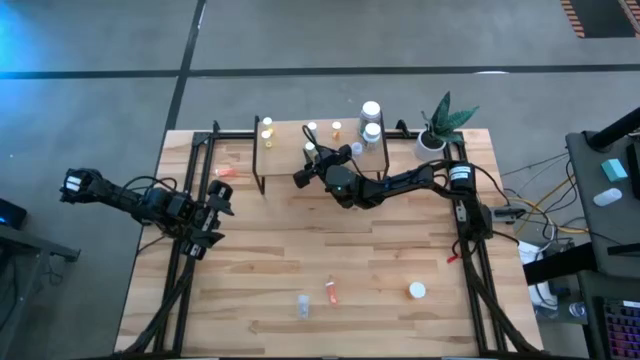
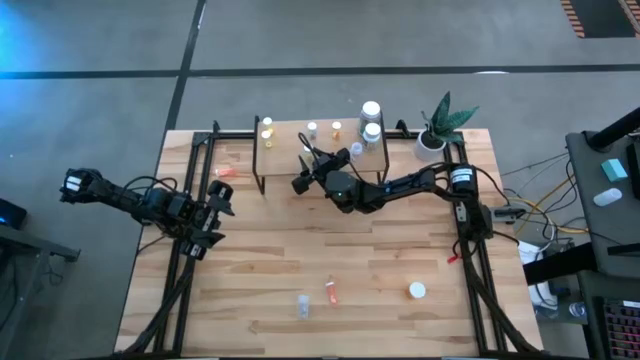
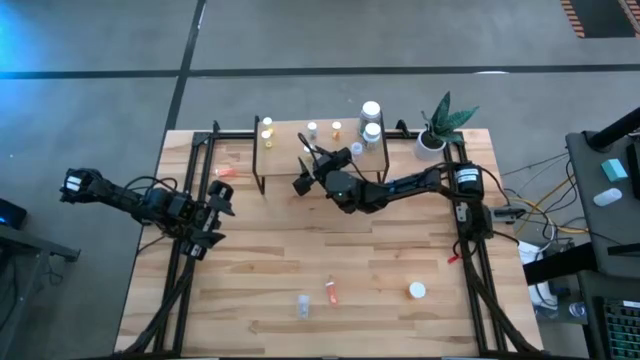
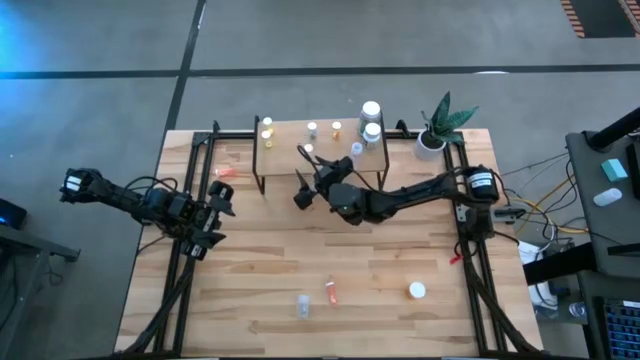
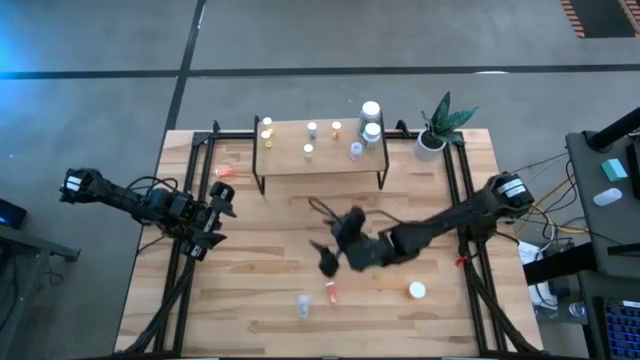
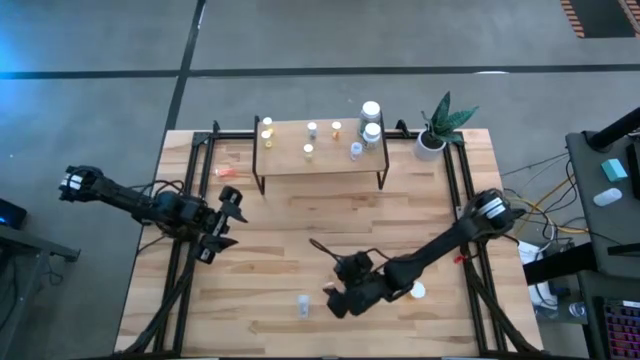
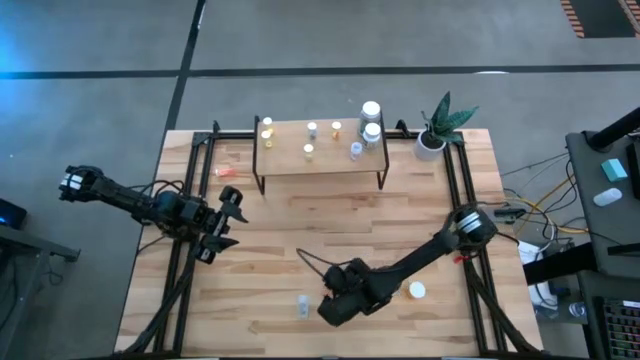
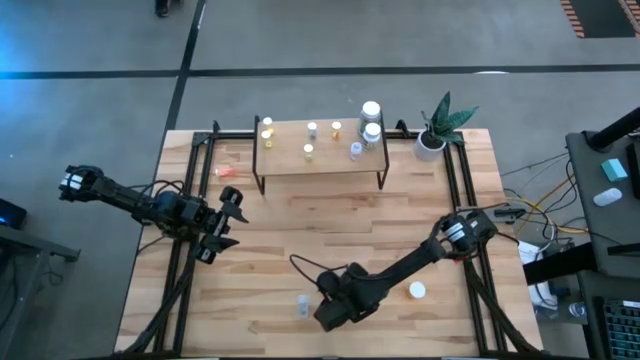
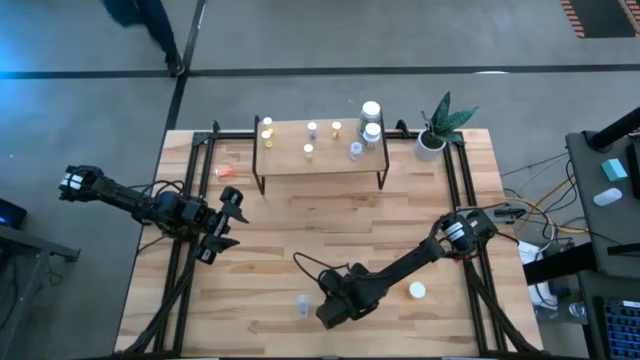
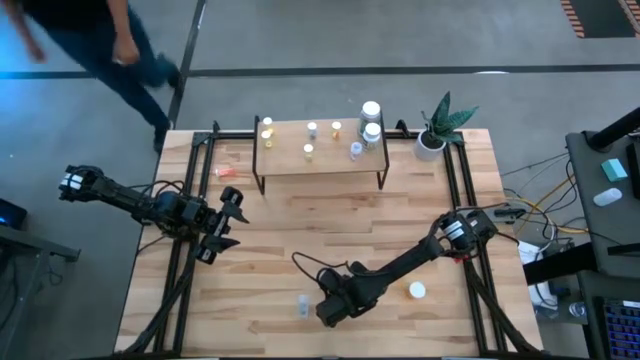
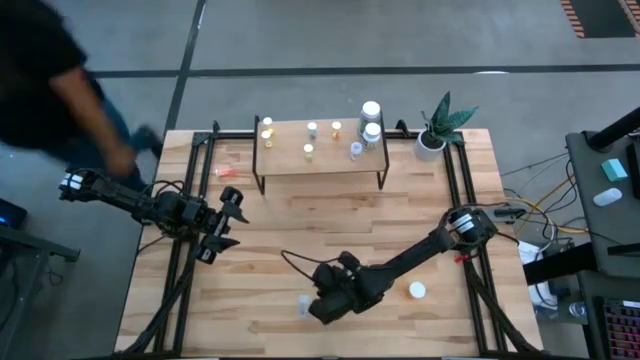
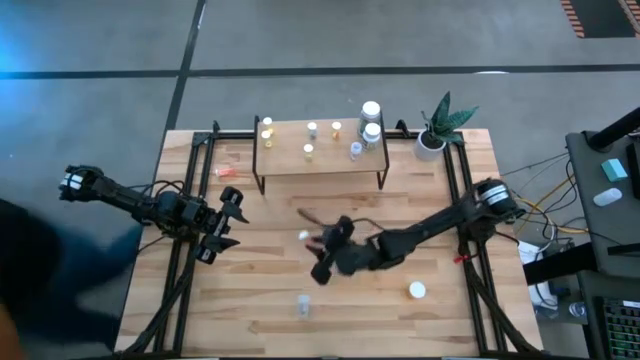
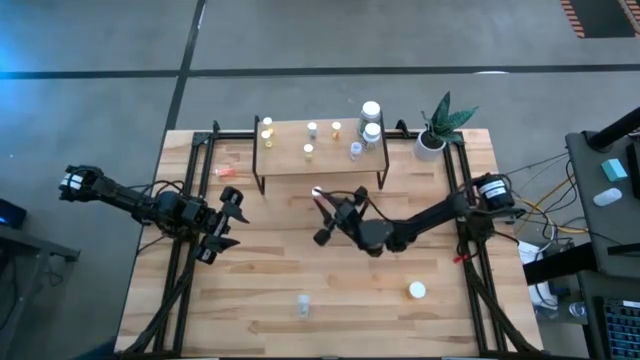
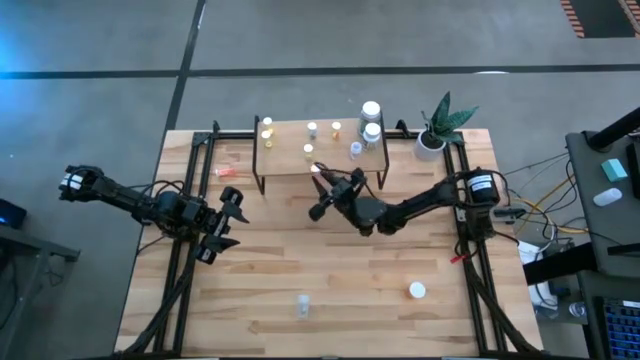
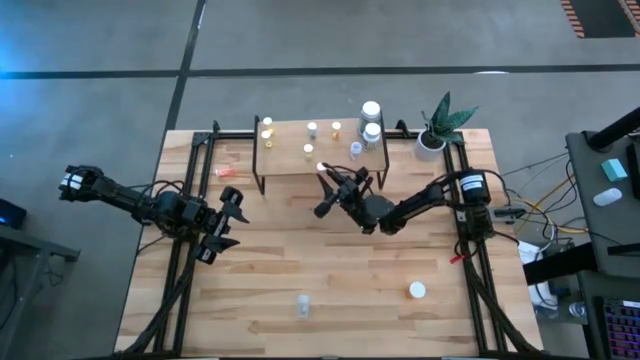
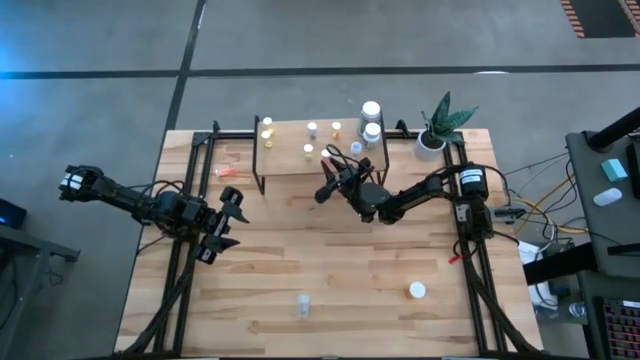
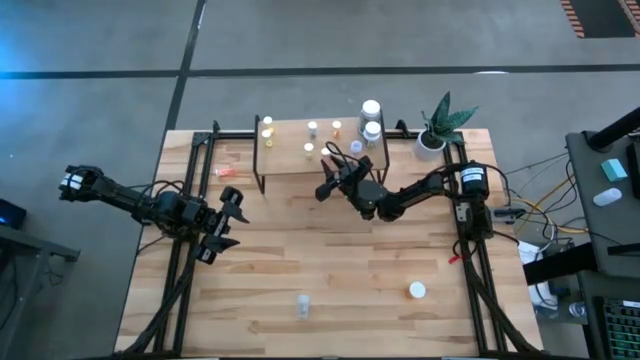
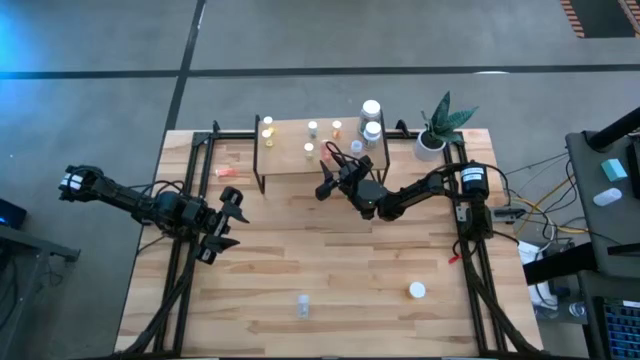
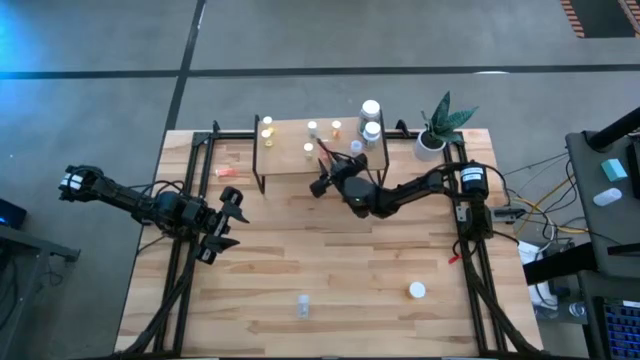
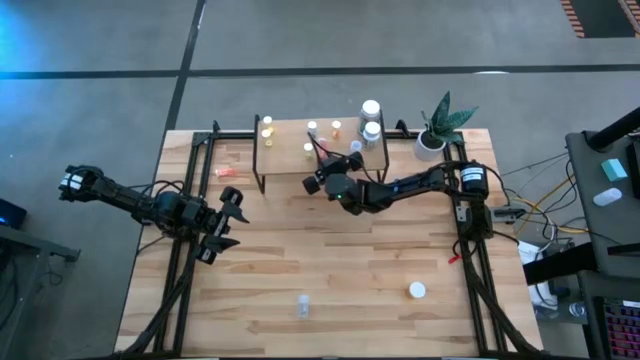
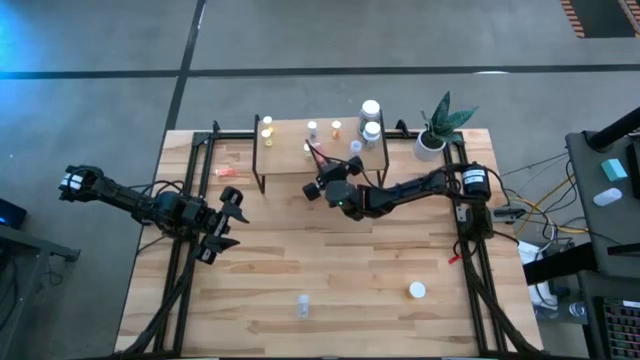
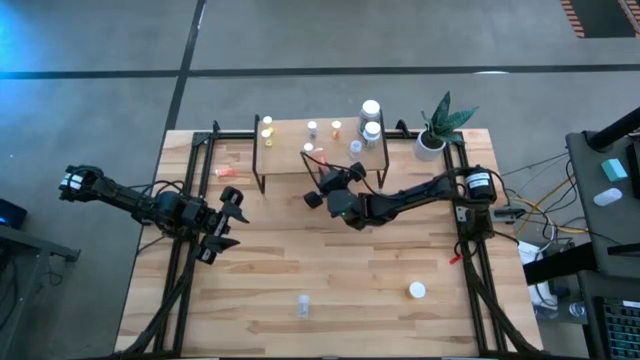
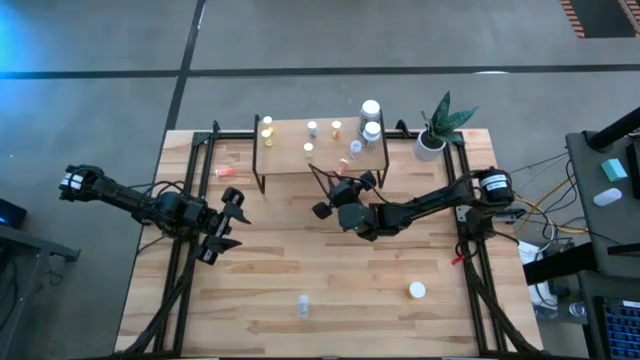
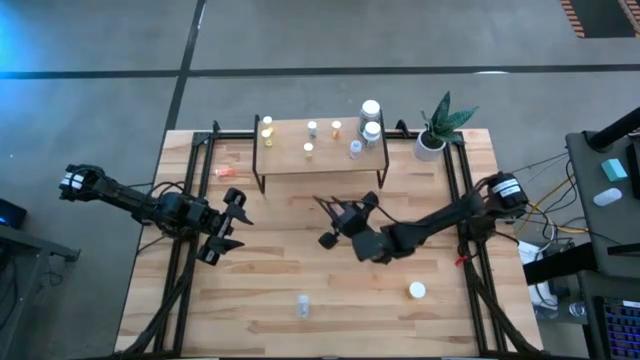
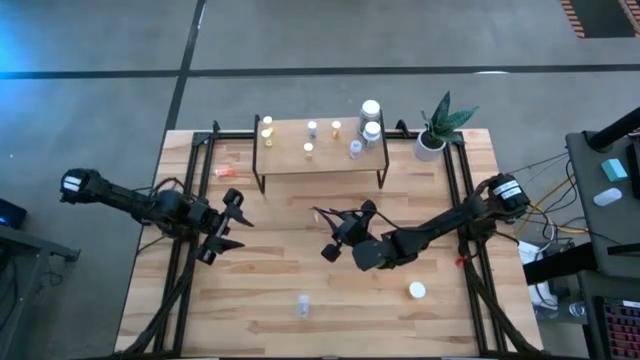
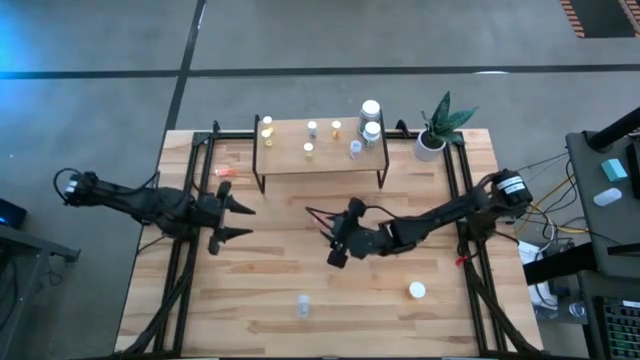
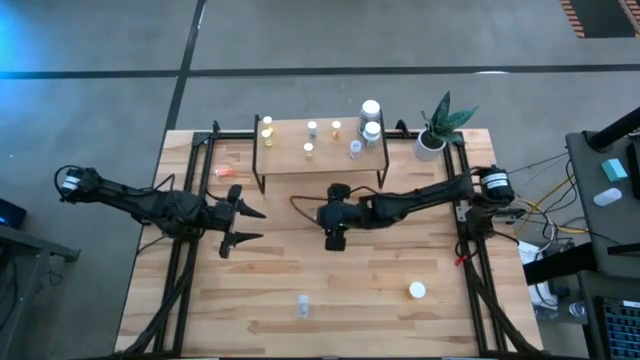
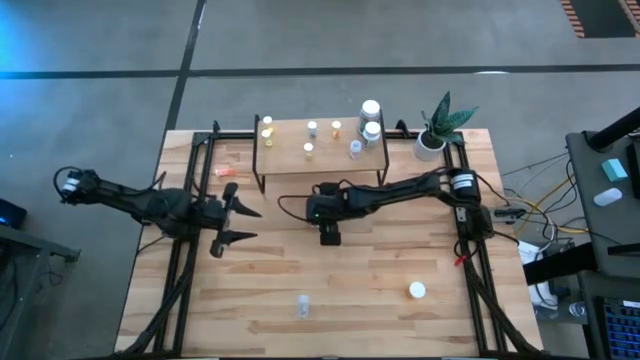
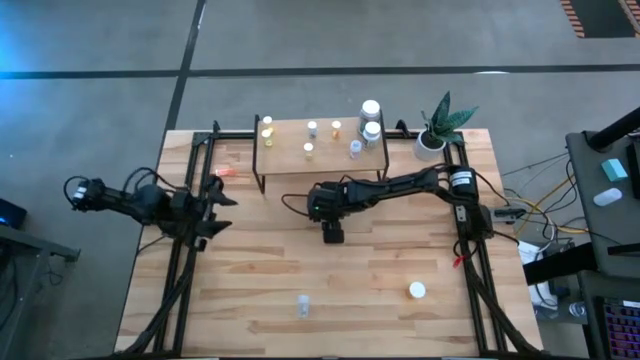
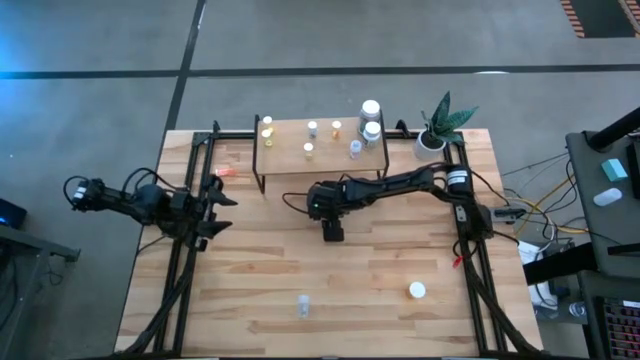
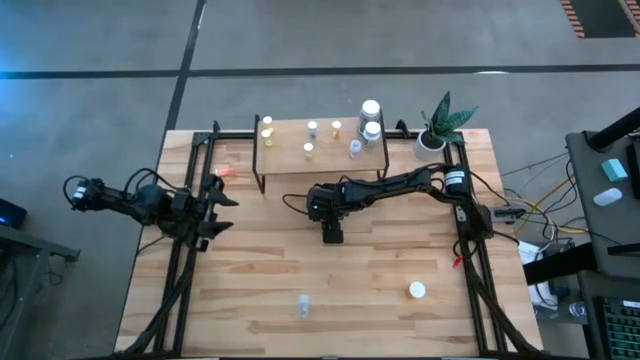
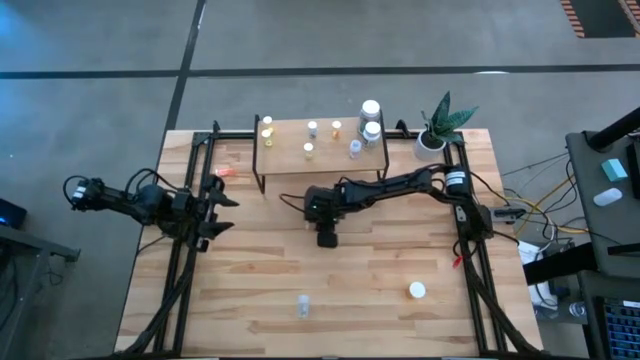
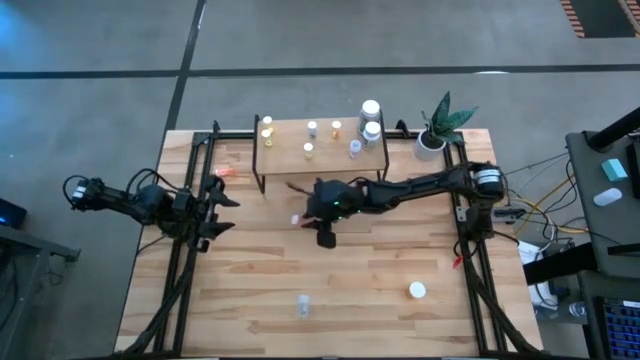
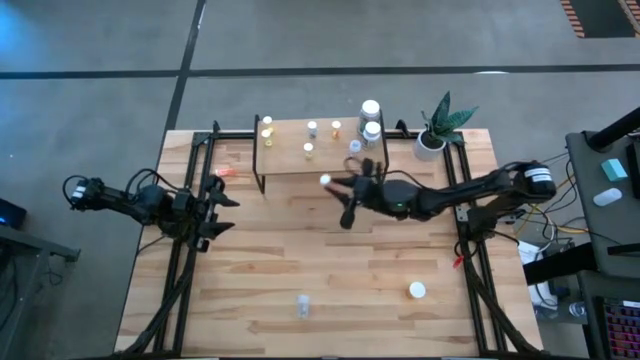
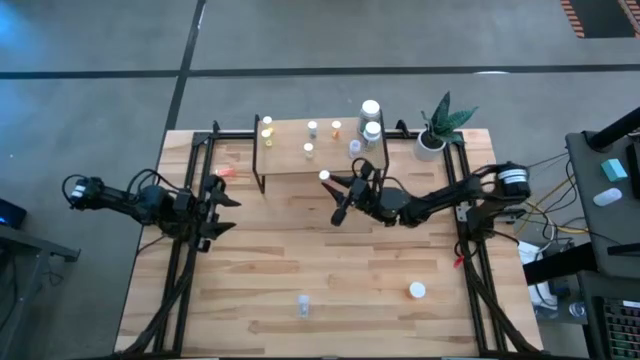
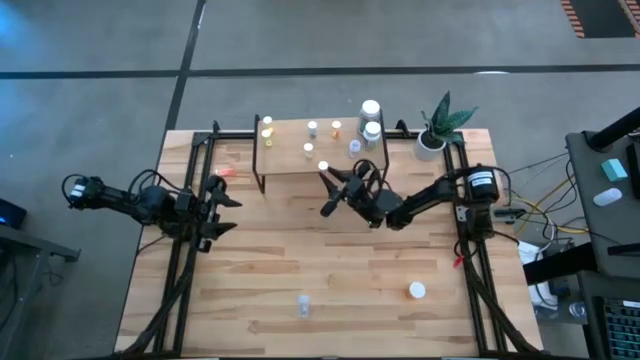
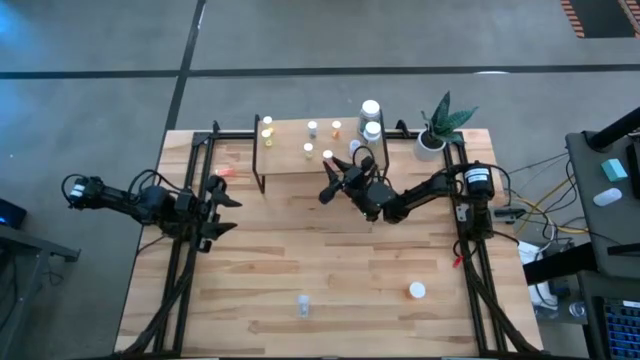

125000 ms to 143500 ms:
Task: Pick and place medicine bottles onto shelf by color
Put the pink pill bottle on the shelf

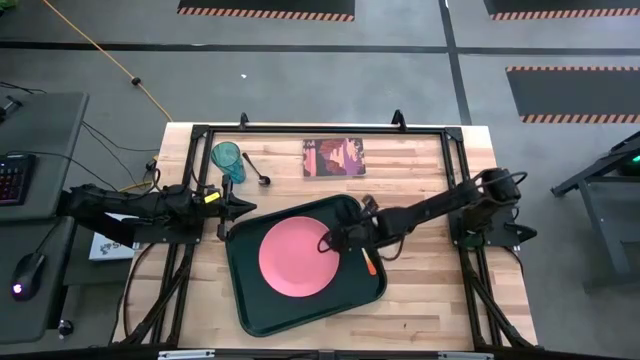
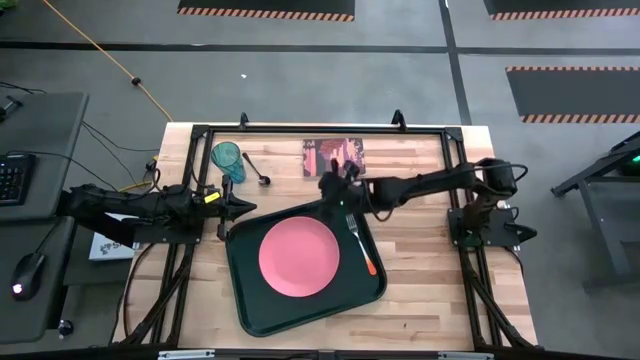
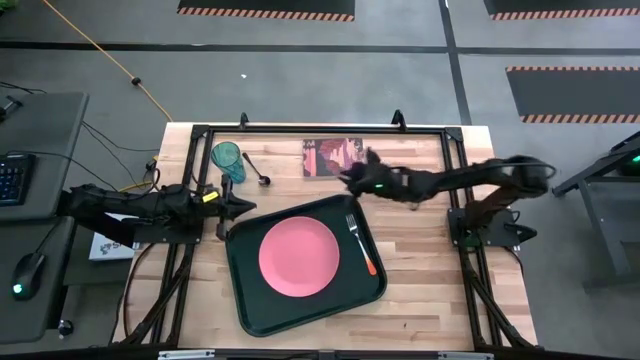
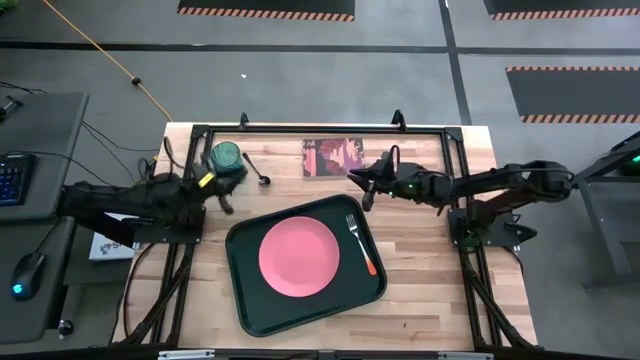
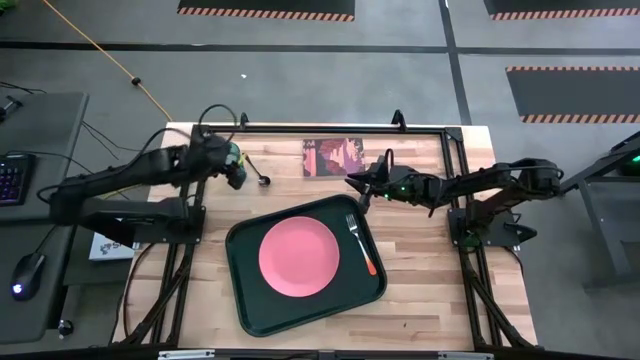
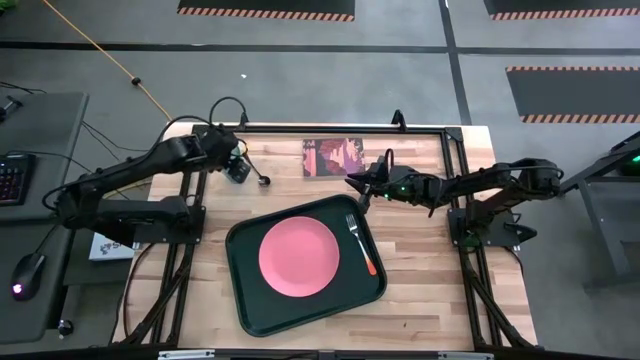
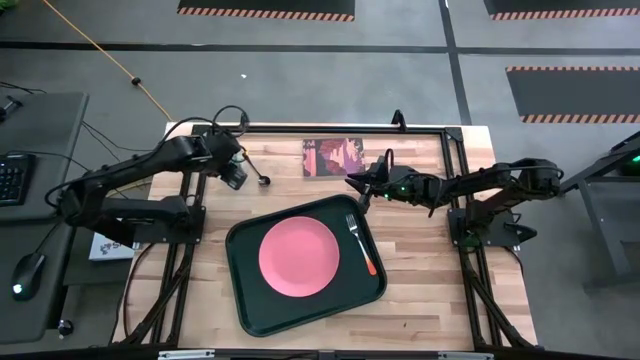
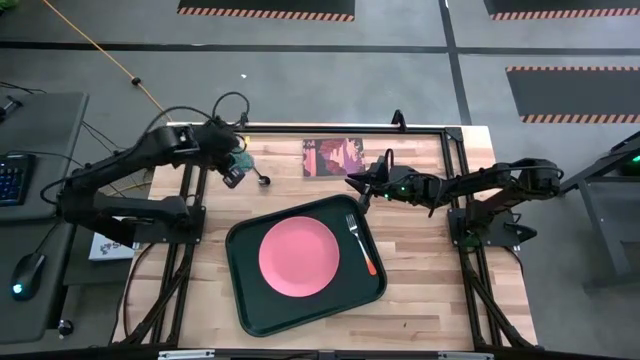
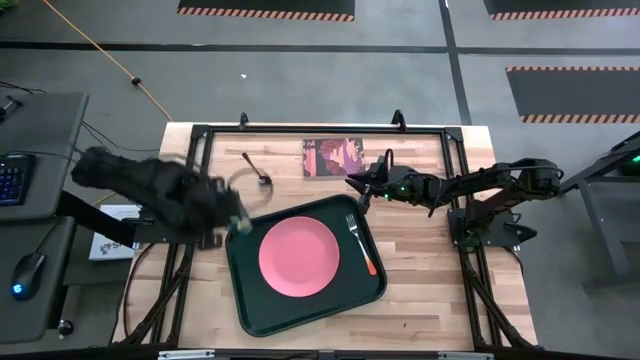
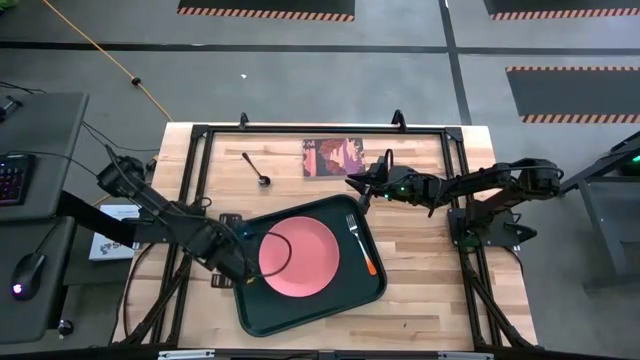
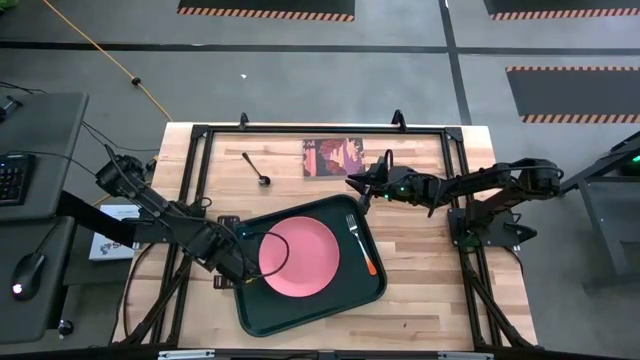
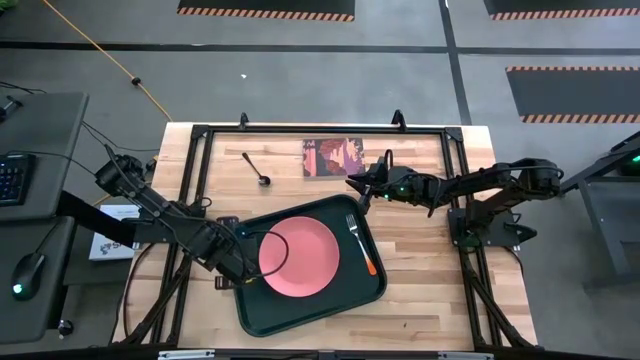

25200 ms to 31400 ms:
Task: Pick and place plate/cup/fork/spoon on tray
Put the blue glass on the black serving tray to the top left of the pink plate
